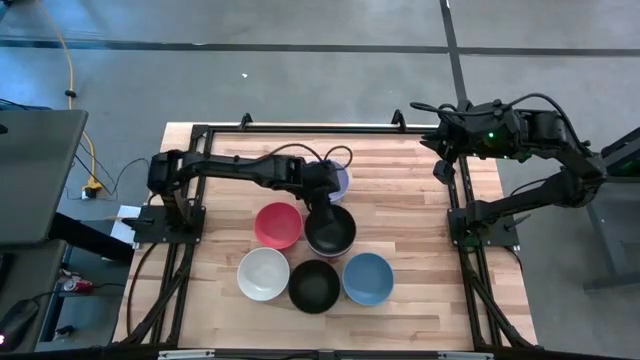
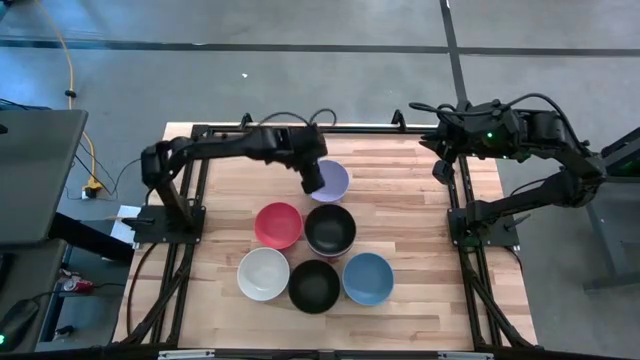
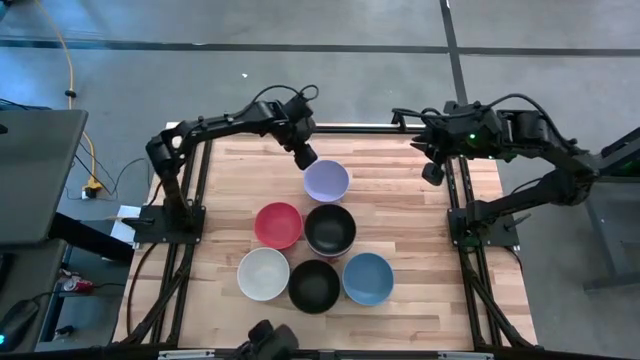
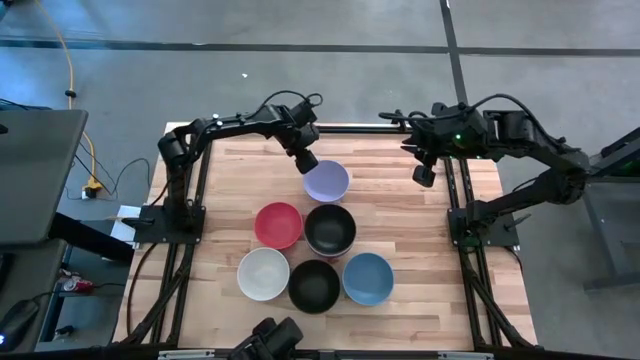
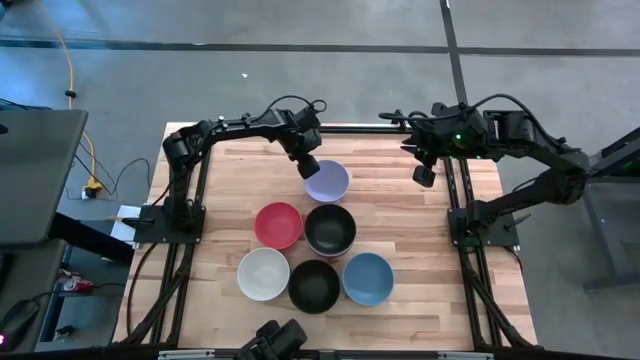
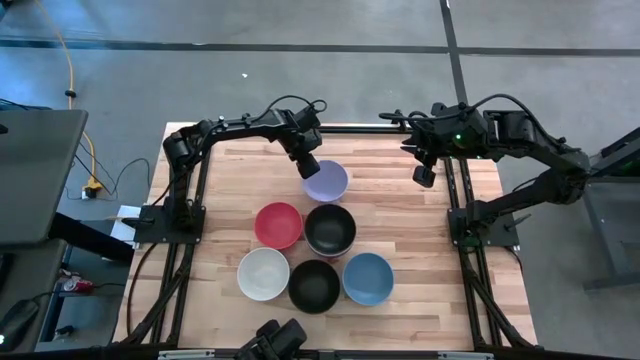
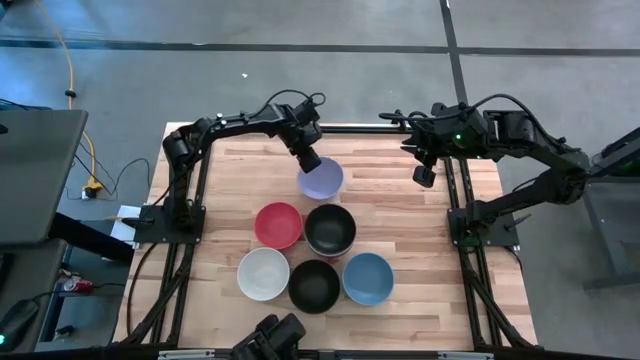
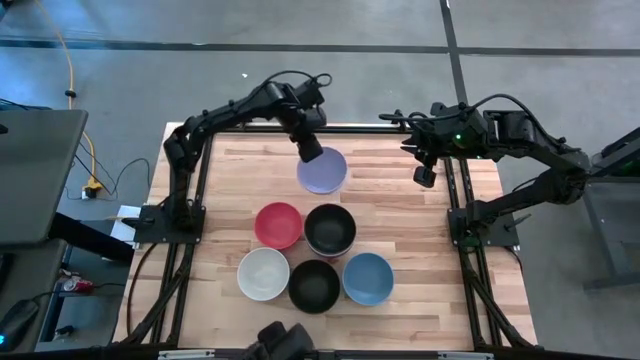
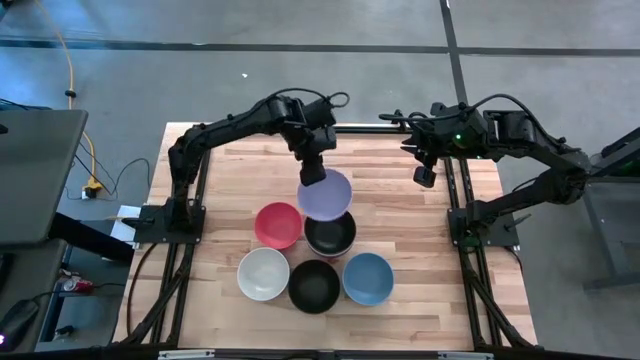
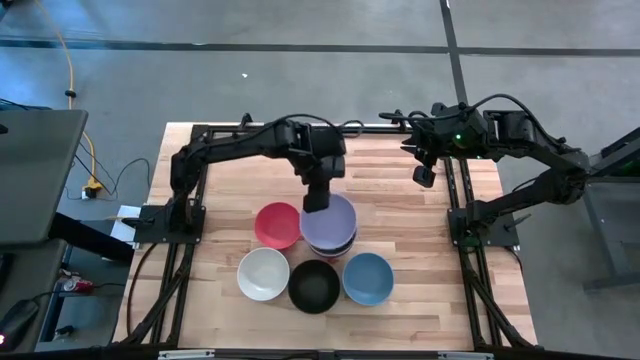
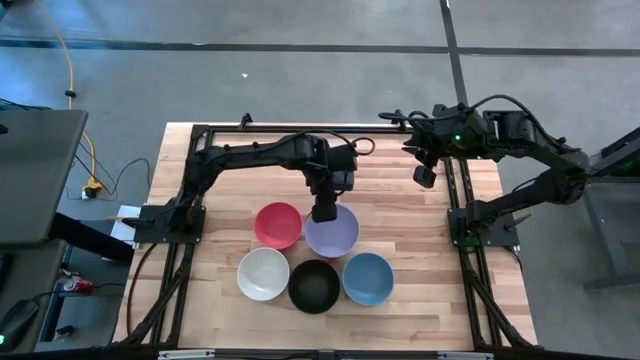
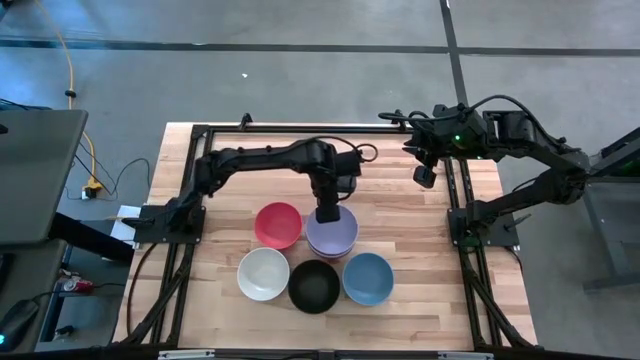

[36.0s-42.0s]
Task: Nest bowls inside each other
Stack the purple bowl on top of the top black bowl

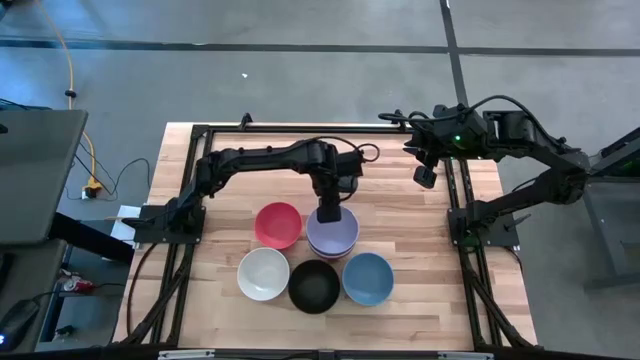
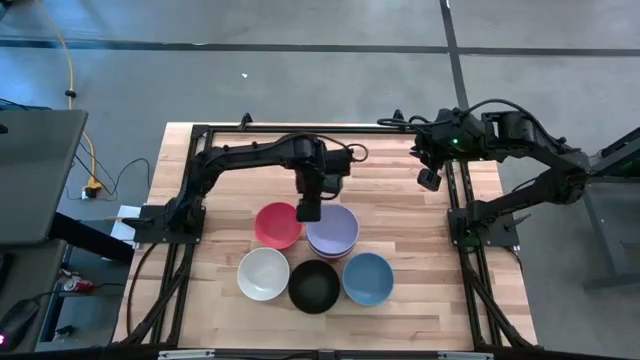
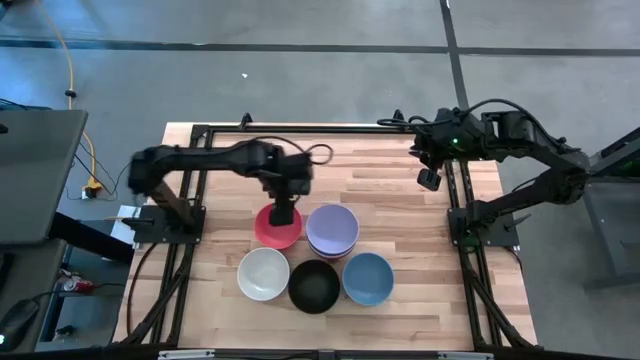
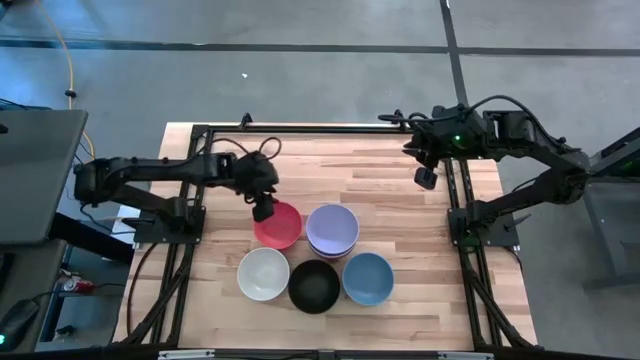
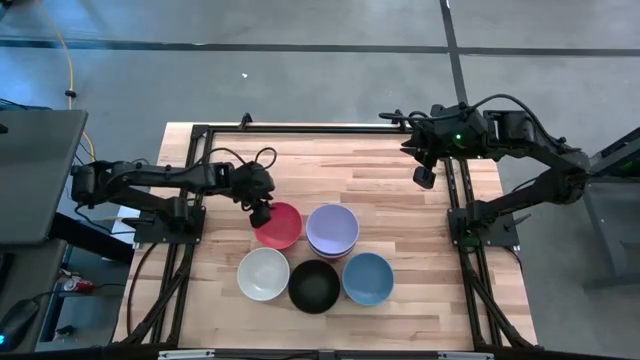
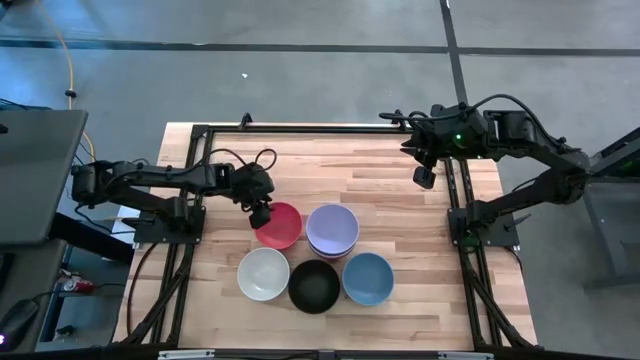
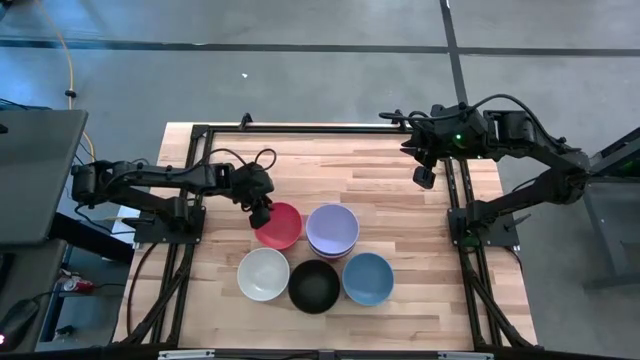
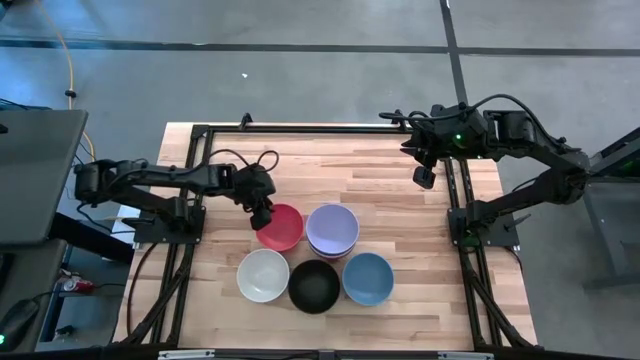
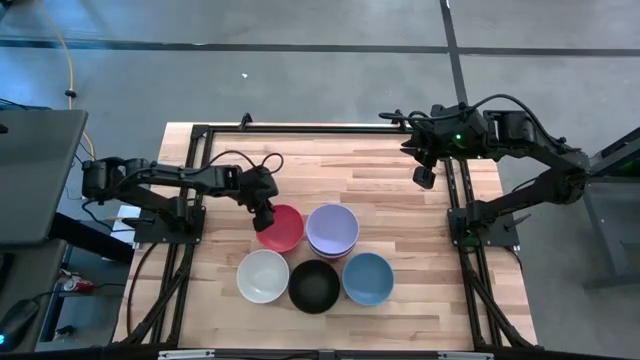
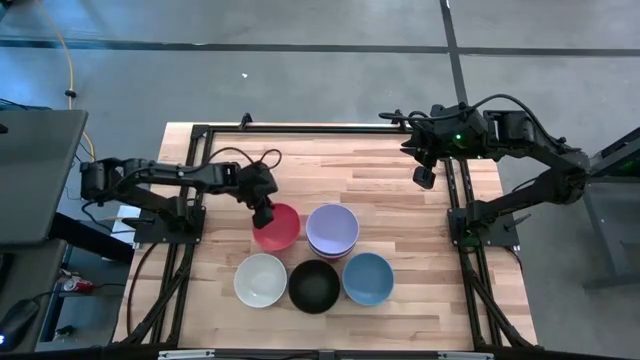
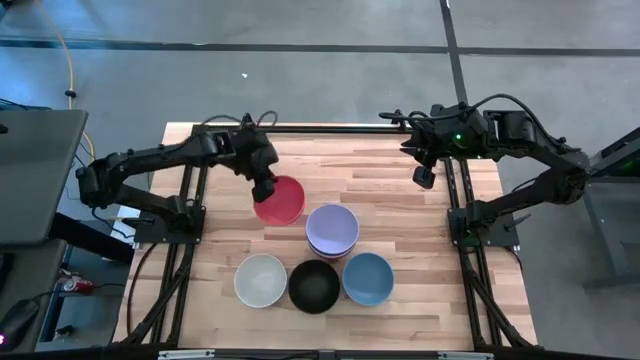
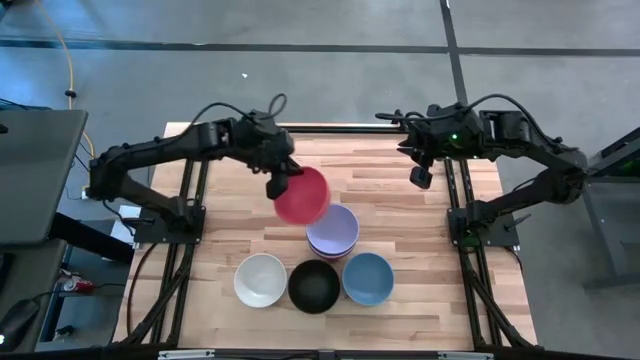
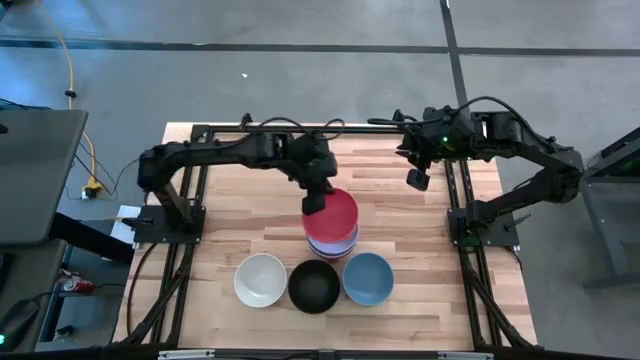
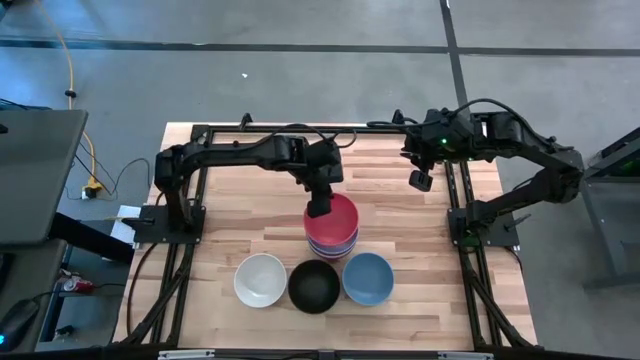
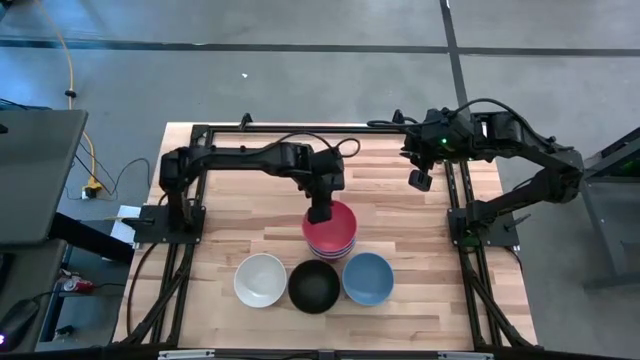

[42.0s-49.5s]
Stack the orange bowl on top of the purple bowl

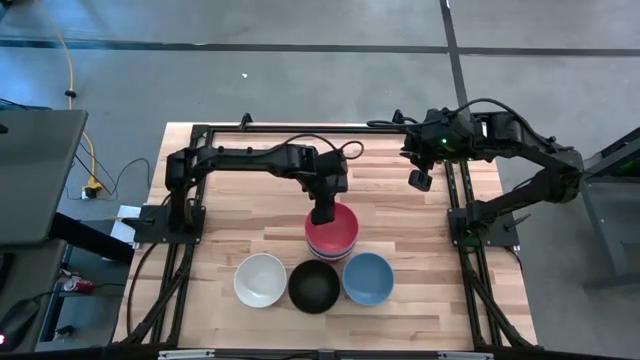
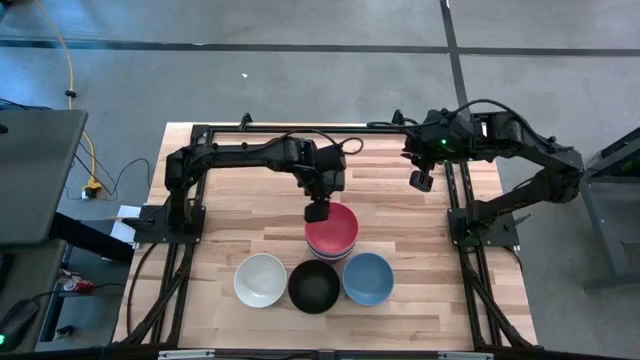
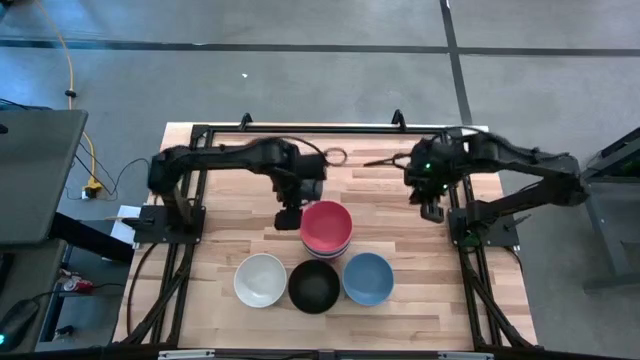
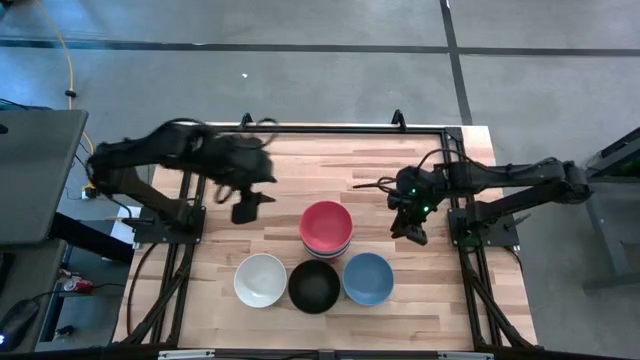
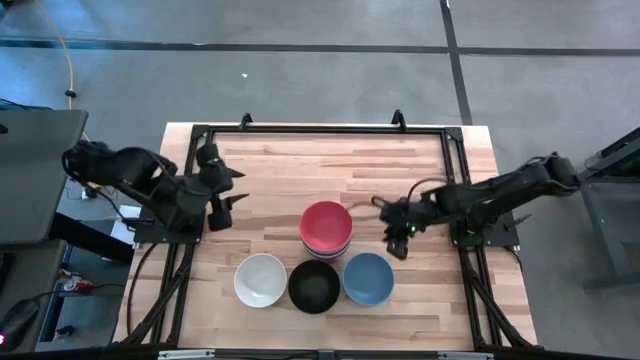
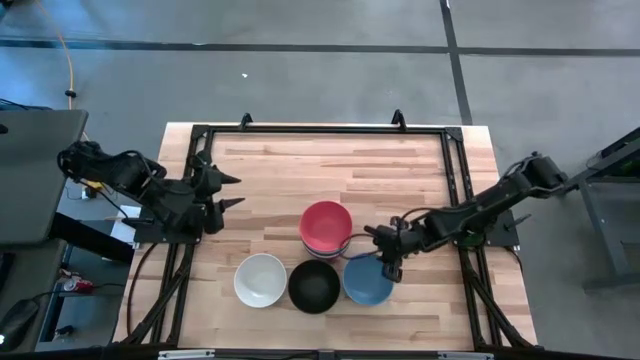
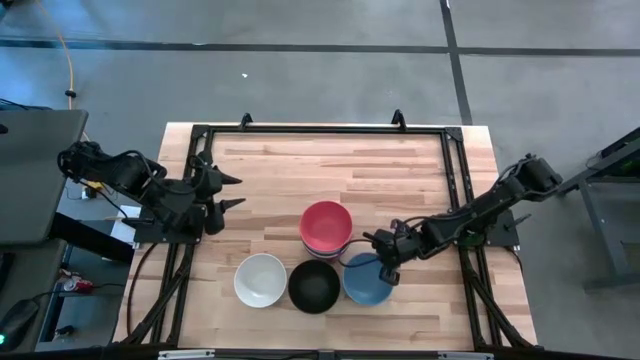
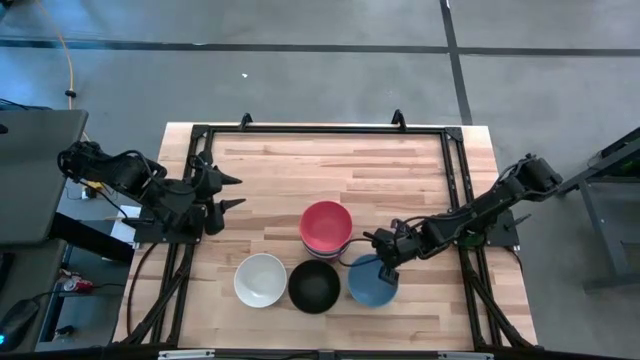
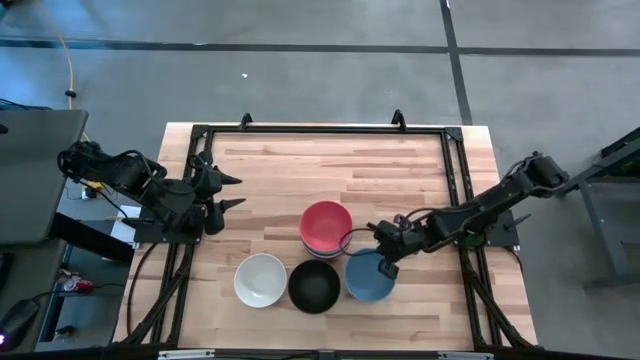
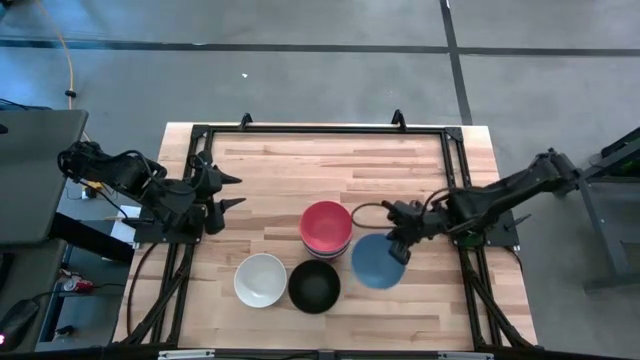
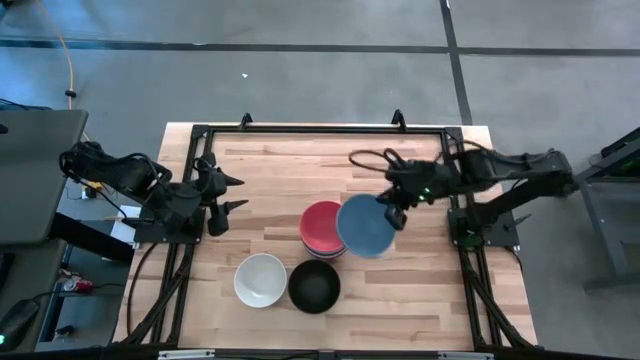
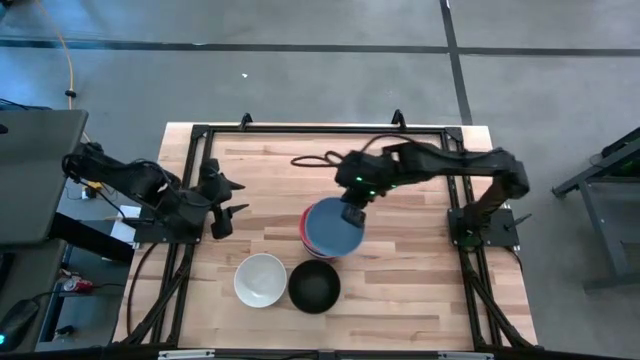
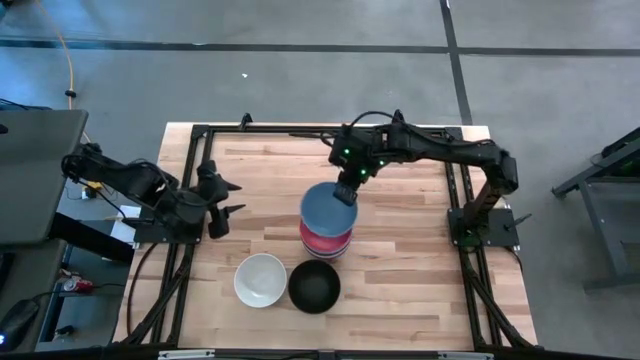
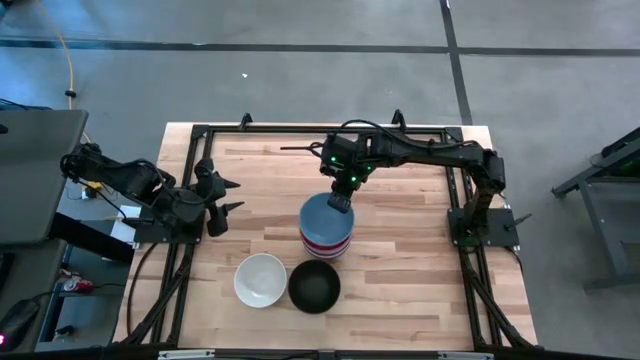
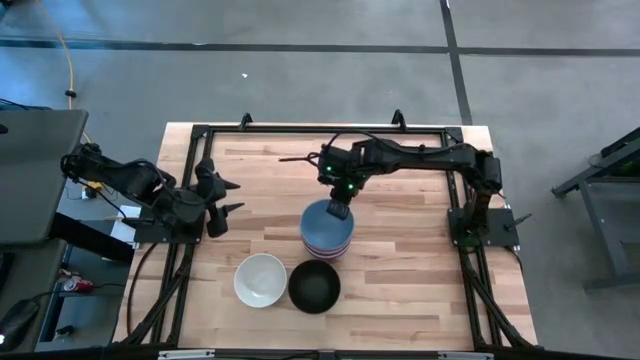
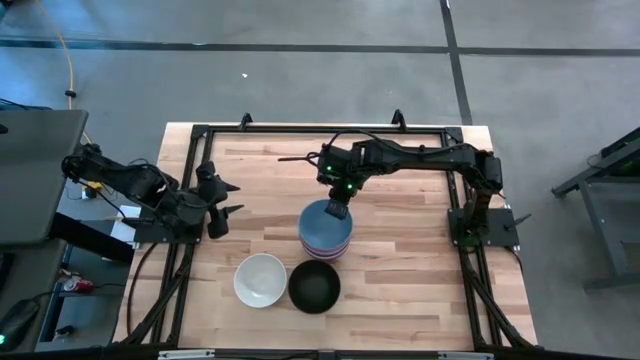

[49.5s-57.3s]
Stack the blue bowl on top of the orange bowl
